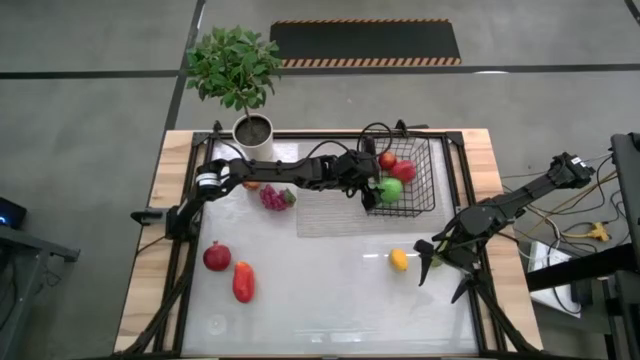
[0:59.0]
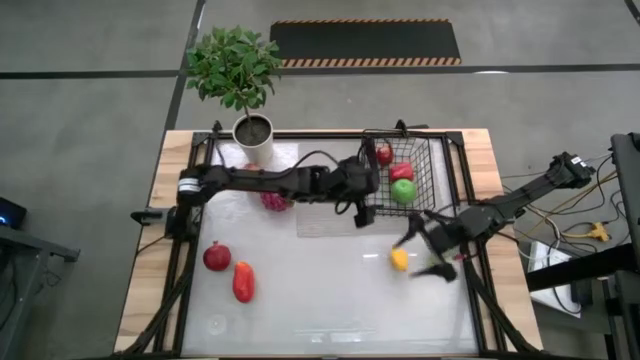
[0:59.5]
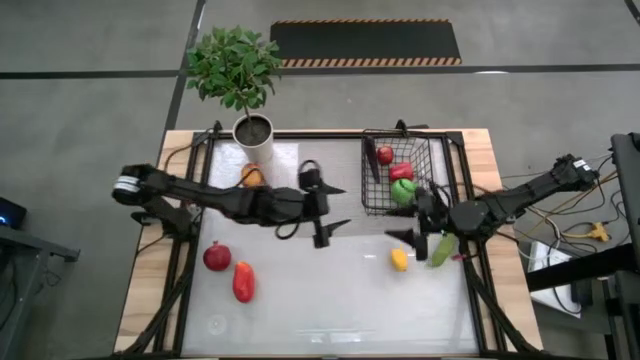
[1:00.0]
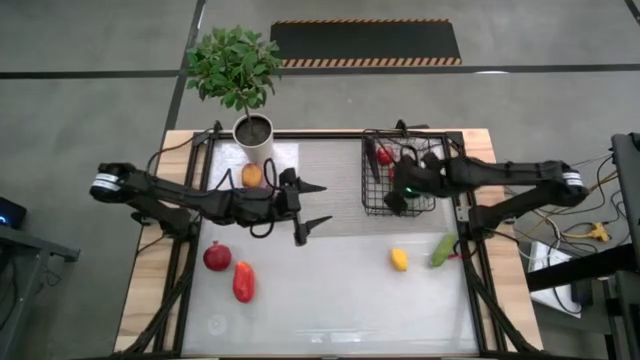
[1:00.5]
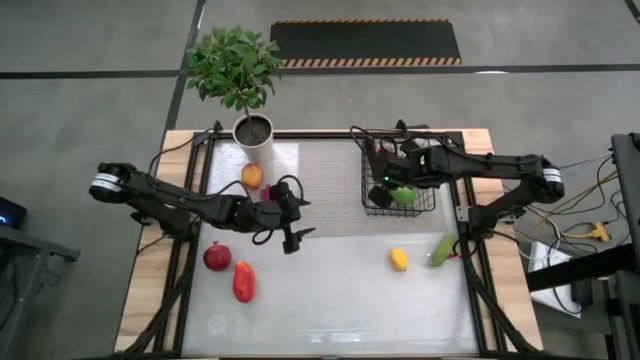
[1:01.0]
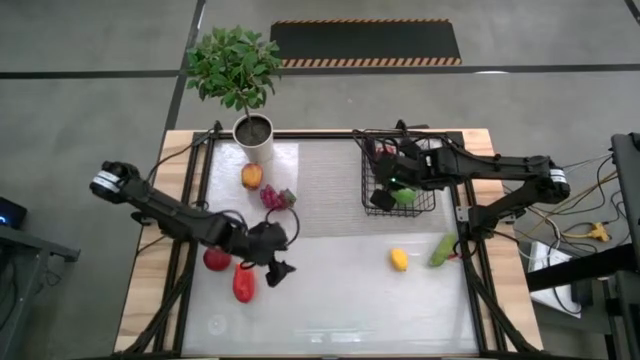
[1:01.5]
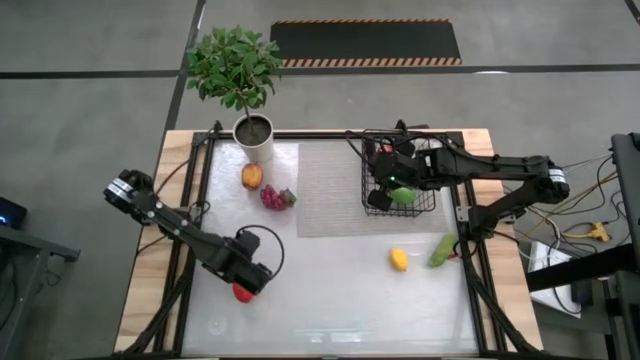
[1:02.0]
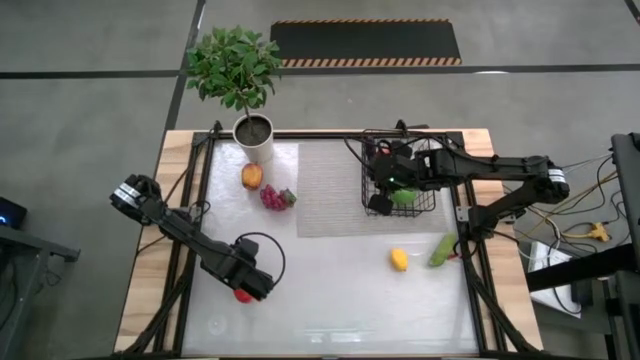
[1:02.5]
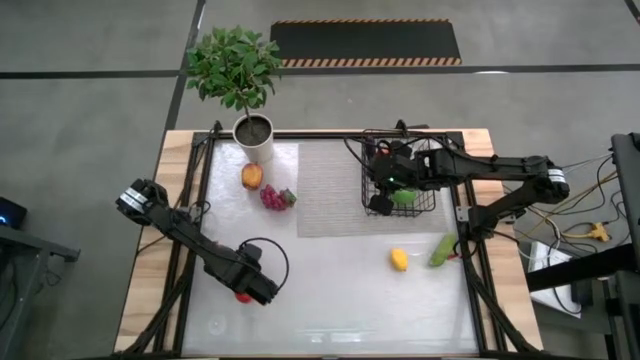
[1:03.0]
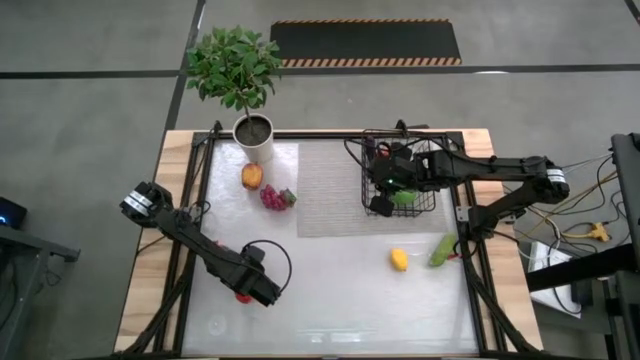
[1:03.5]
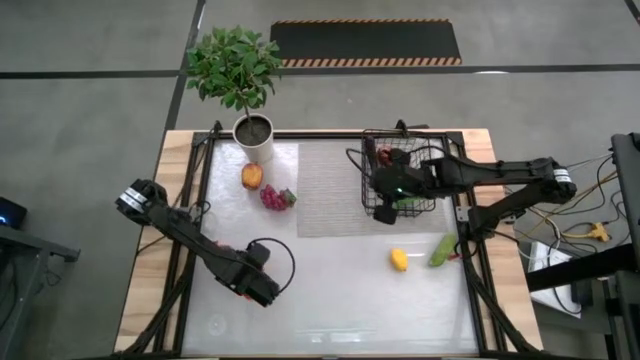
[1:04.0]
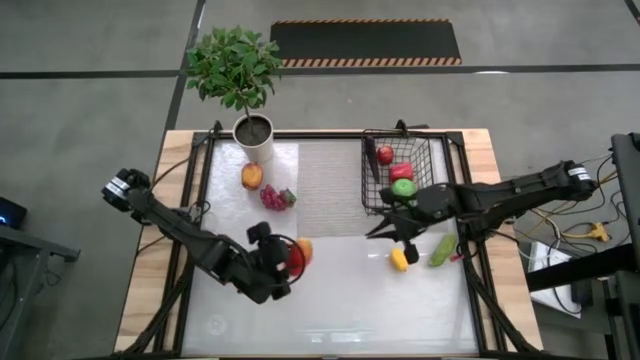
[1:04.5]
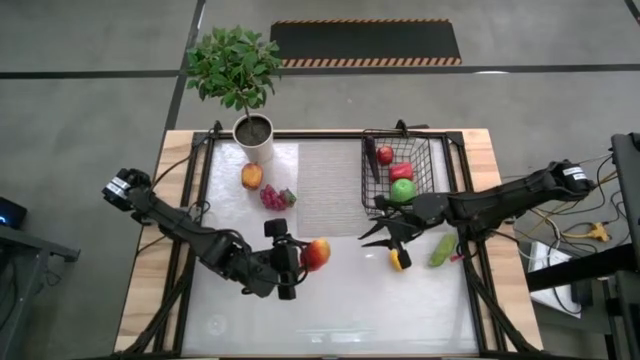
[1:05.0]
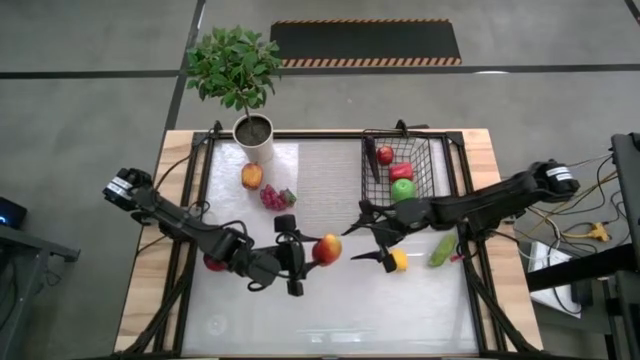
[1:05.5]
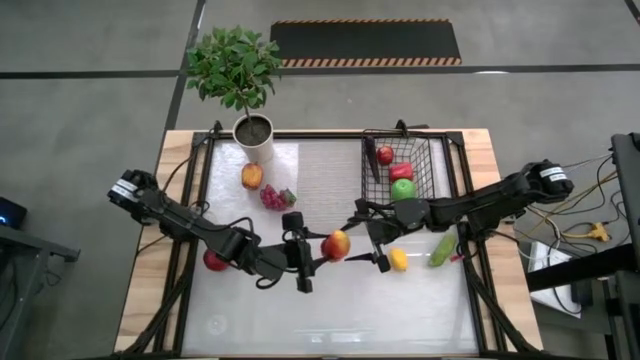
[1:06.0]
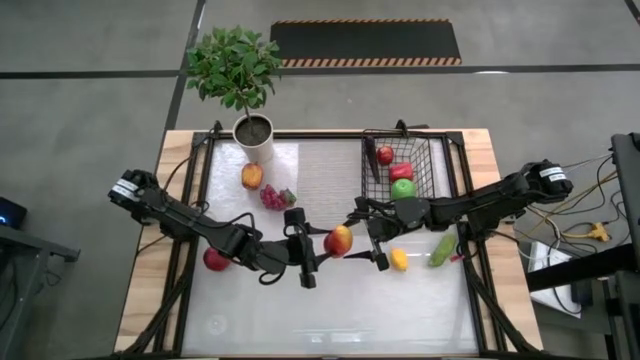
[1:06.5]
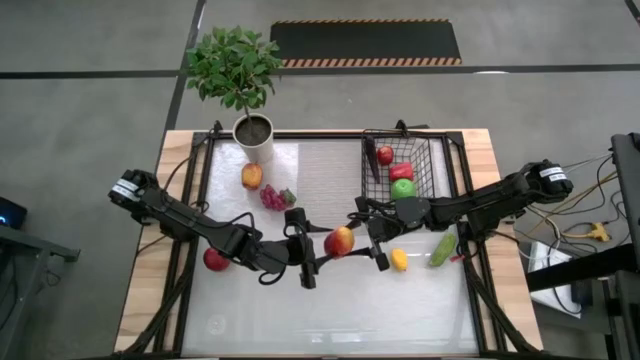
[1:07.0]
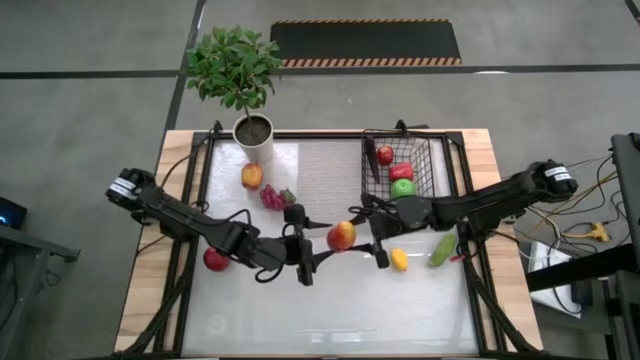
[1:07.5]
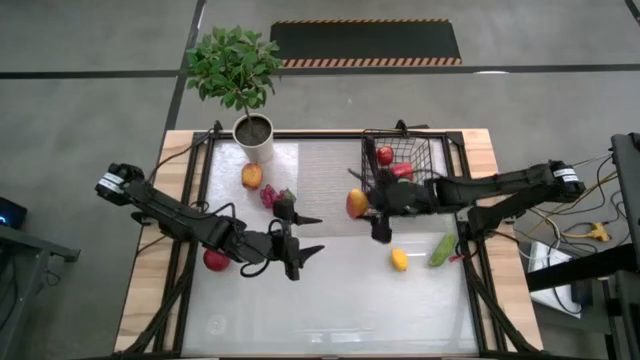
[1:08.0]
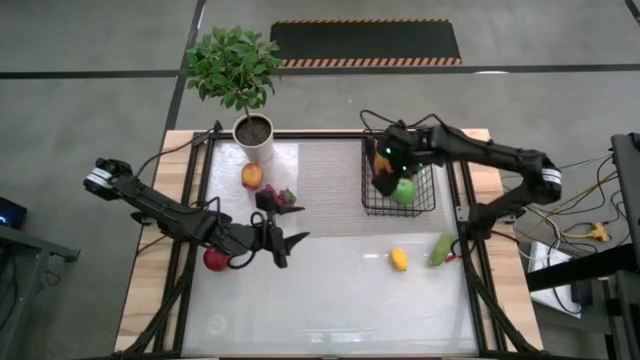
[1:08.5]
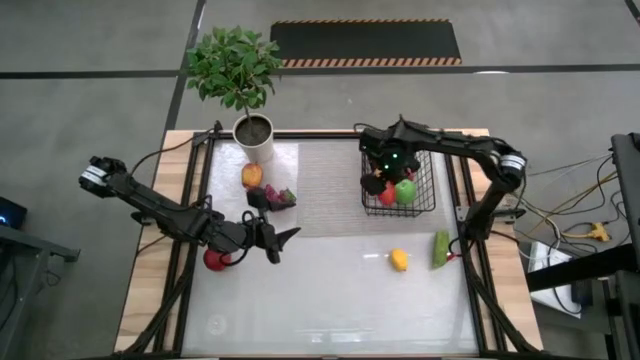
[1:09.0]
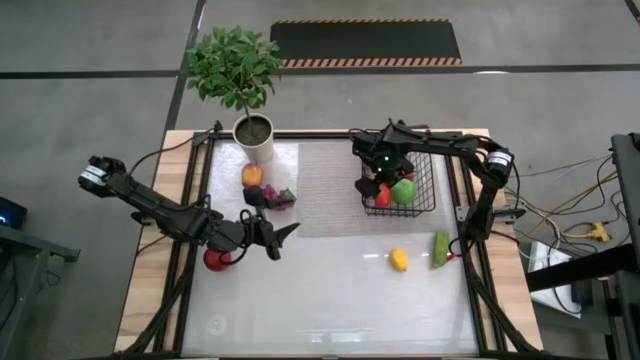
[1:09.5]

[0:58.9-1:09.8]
Task: Build produce basket
Put the orange mango into the wire basket

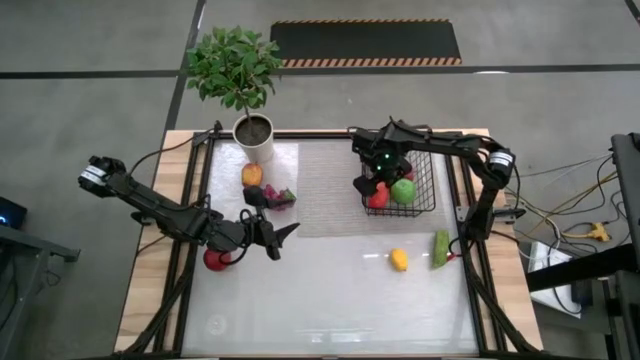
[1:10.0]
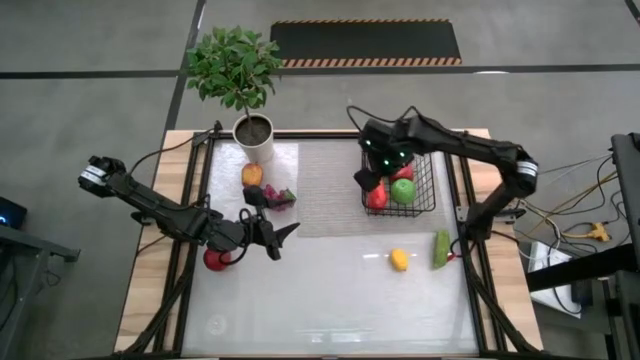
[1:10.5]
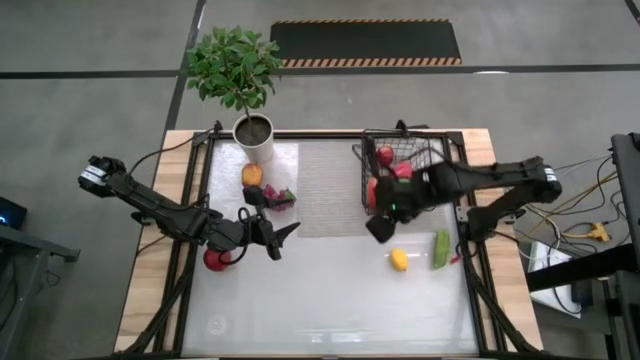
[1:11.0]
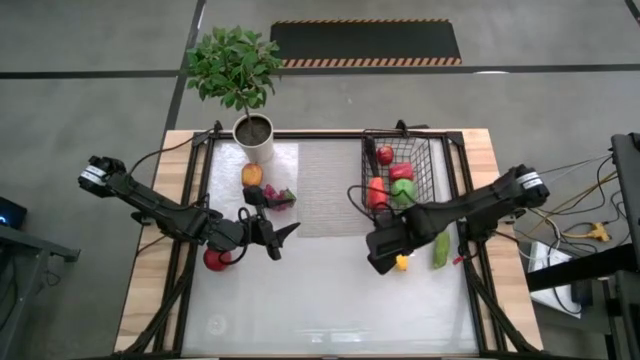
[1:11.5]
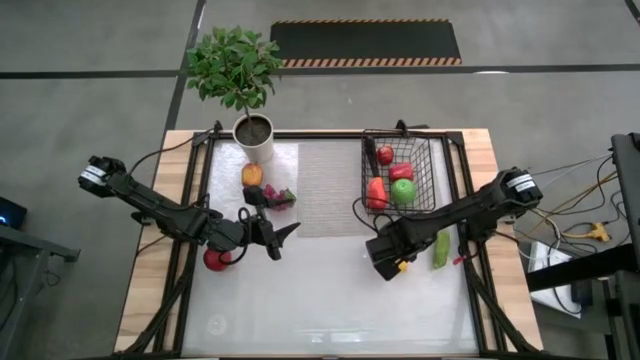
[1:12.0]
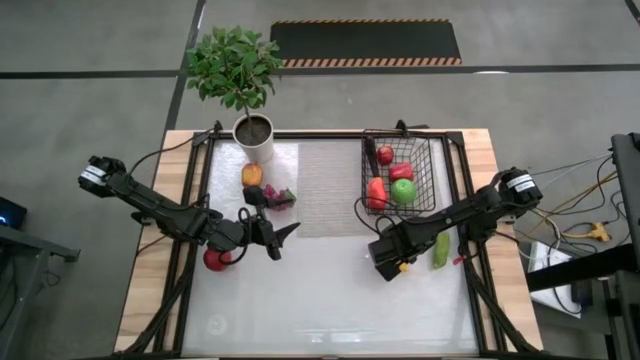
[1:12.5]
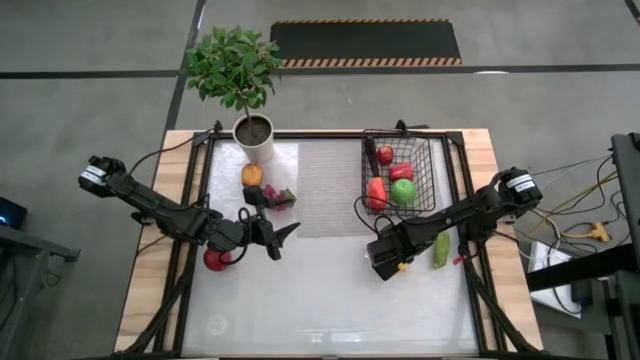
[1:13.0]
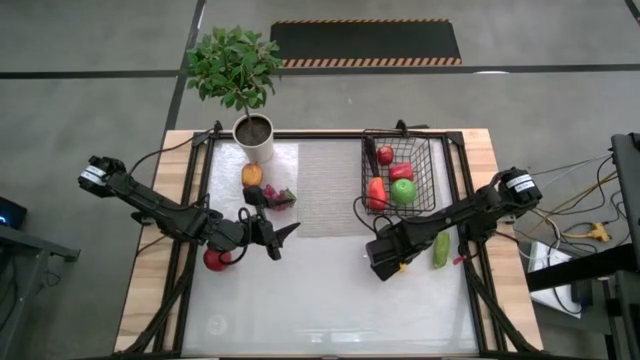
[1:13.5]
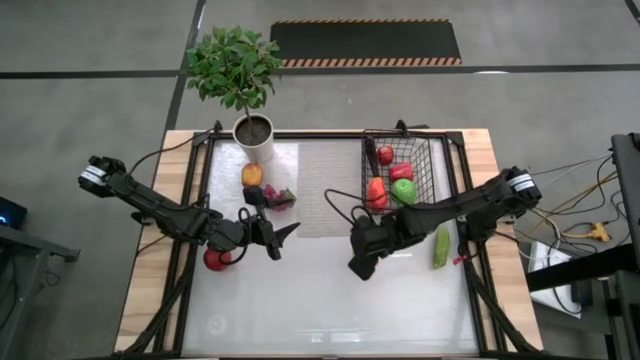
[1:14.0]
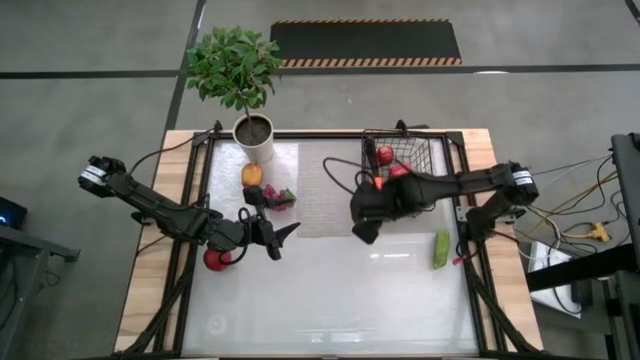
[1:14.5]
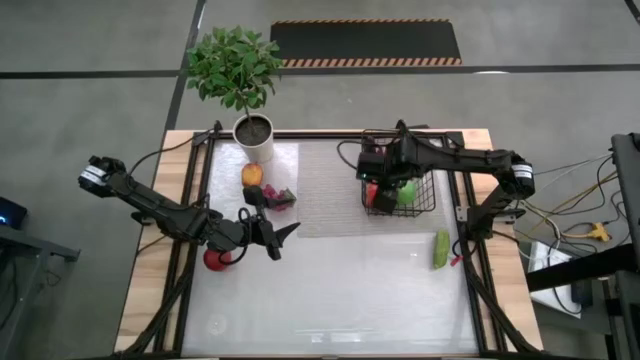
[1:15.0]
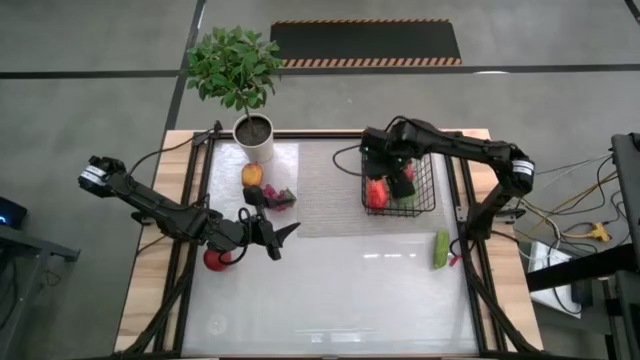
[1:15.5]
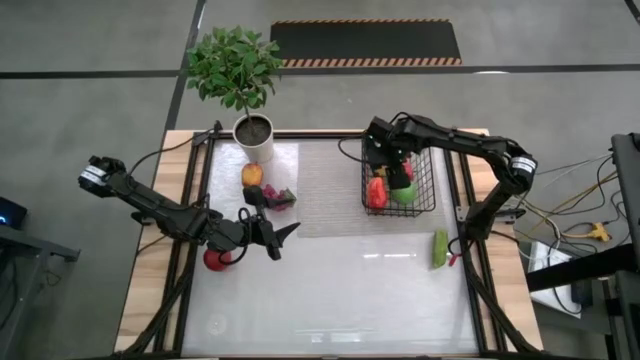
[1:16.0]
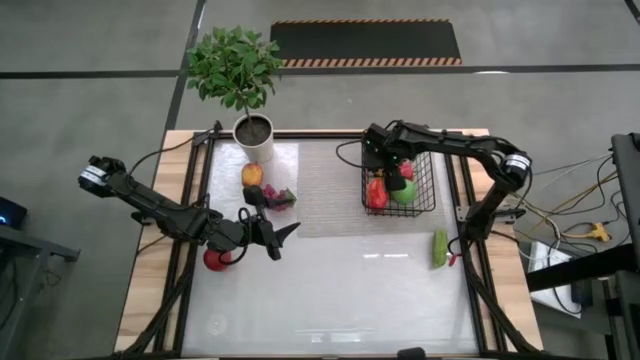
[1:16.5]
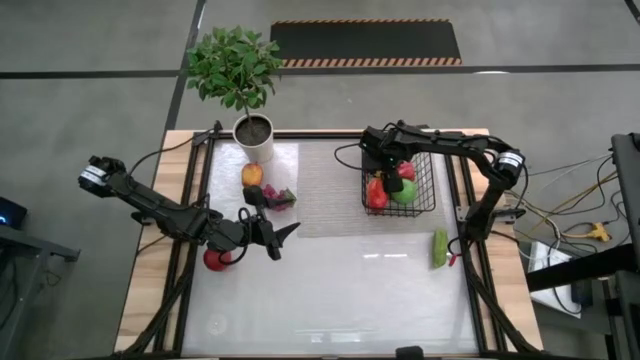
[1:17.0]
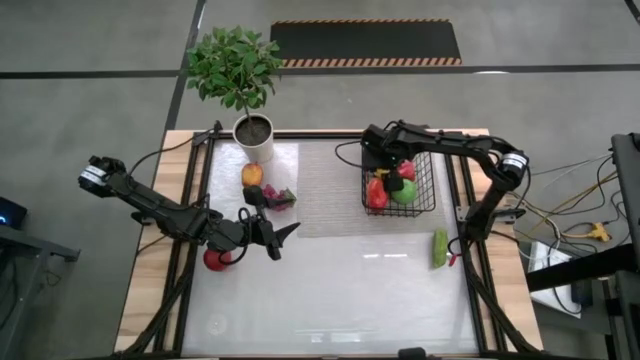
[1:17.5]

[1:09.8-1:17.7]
Put the yellow lemon into the wire basket

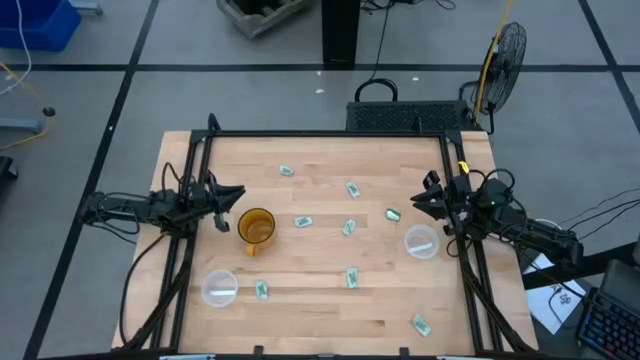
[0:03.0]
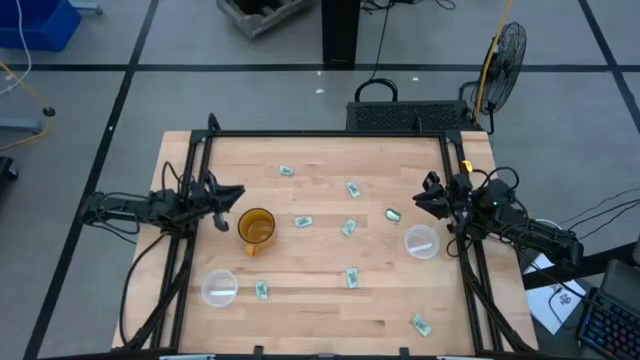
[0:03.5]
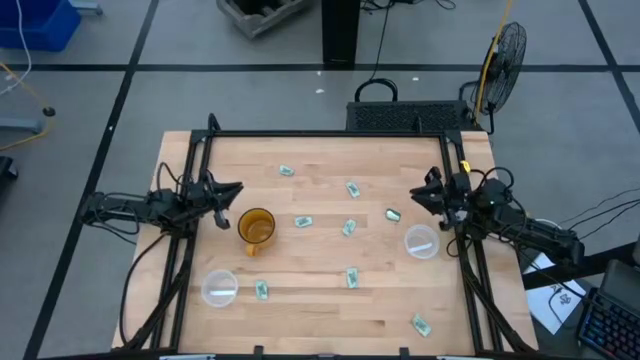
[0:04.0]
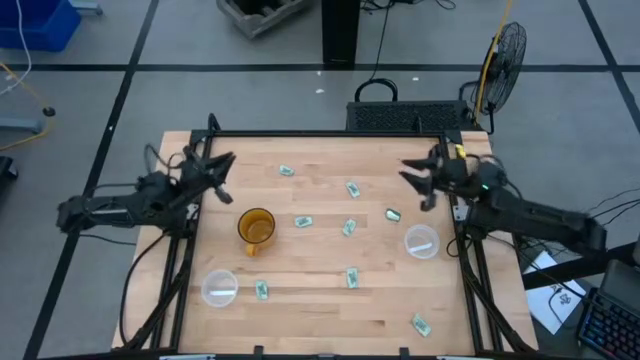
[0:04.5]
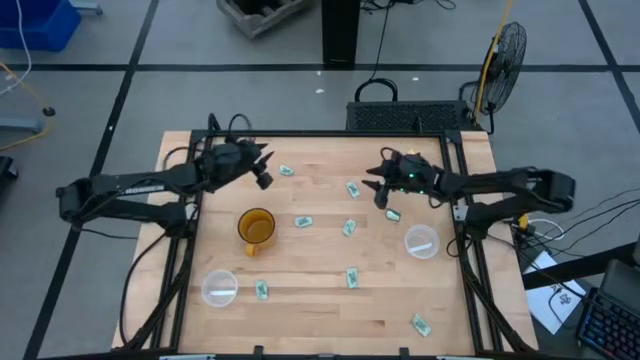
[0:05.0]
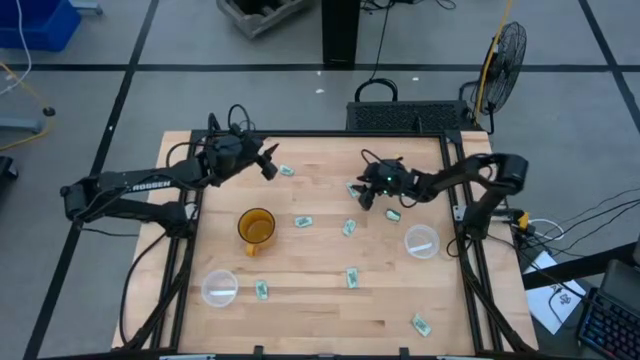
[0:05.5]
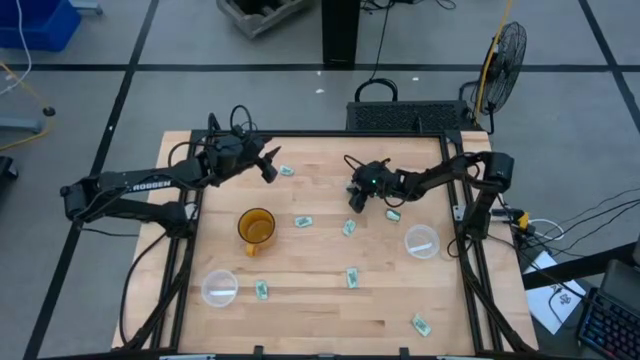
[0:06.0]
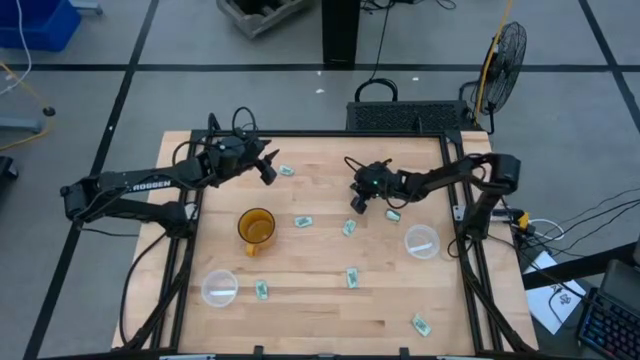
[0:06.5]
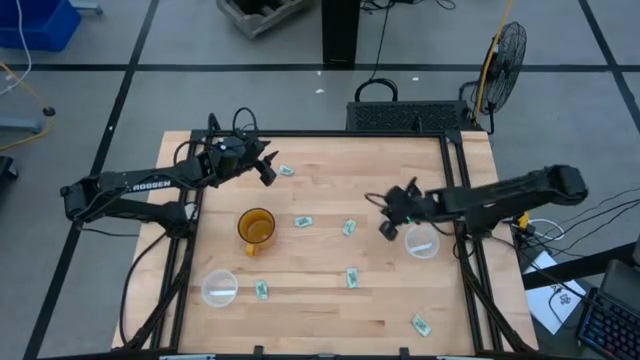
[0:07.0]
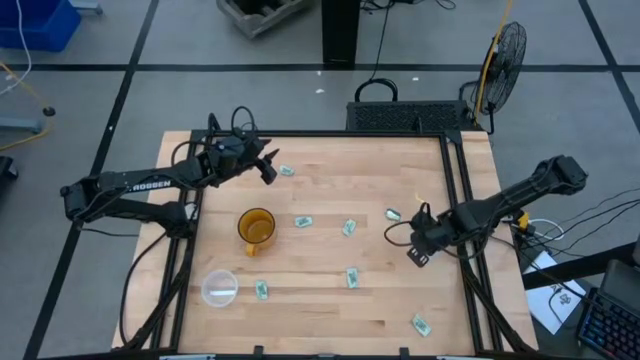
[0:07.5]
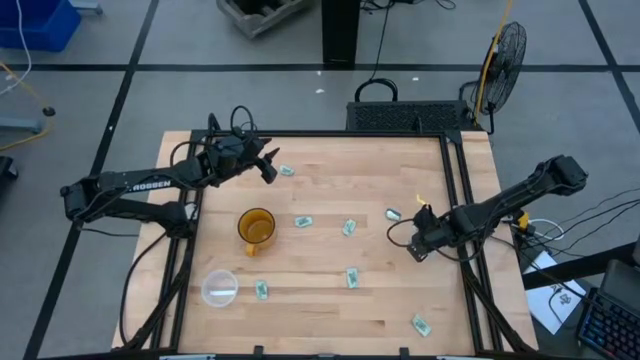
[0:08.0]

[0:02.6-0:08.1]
Task: Pick and place Stevia / Truvia into bins
Put the stevia packet into the right transparent container
